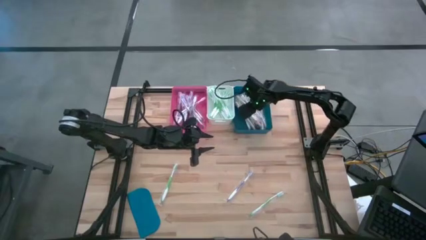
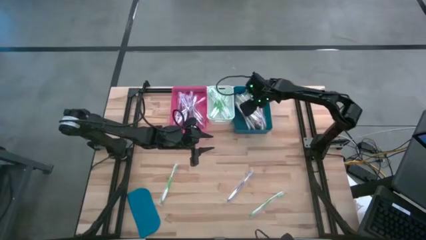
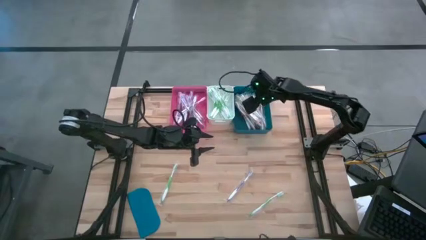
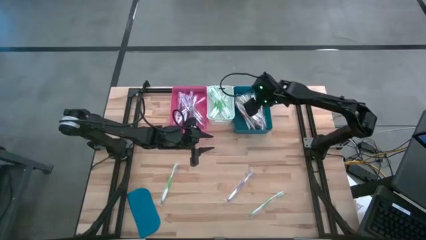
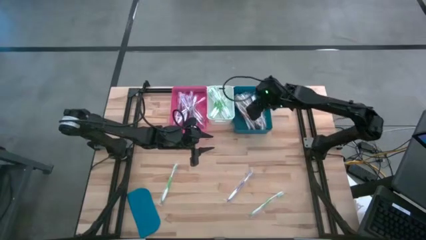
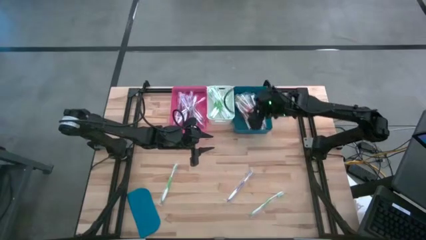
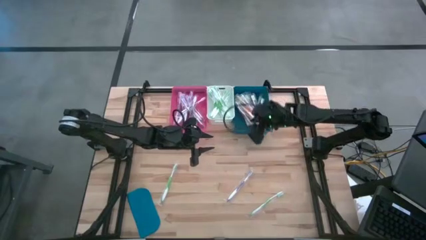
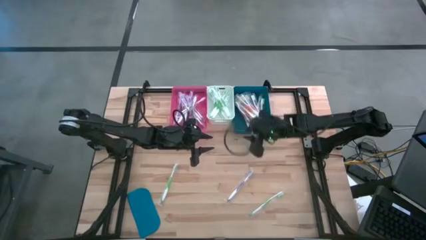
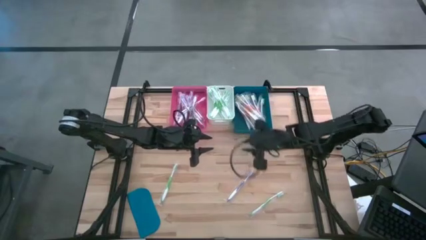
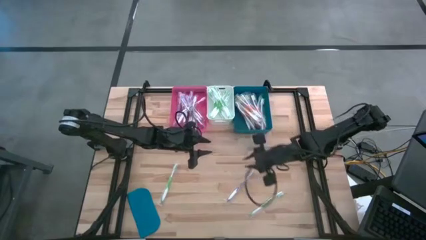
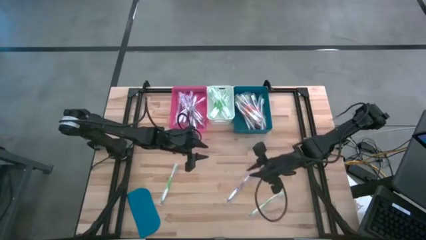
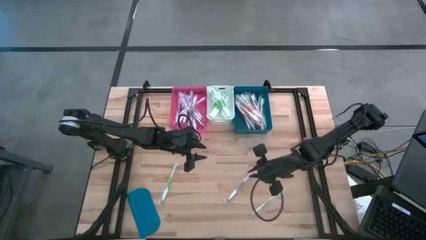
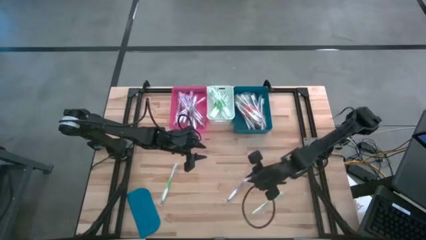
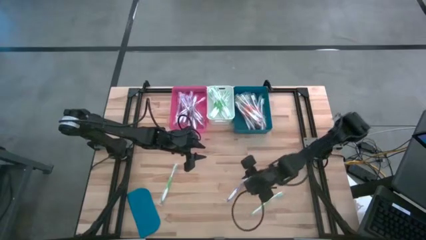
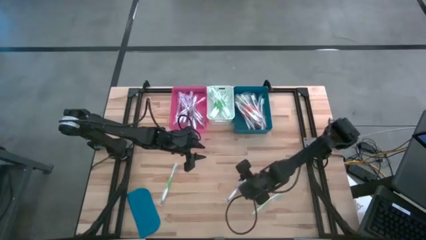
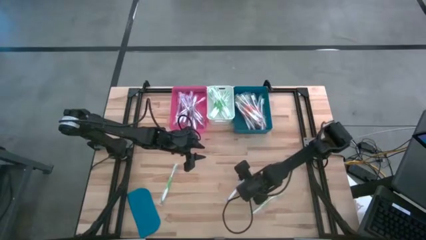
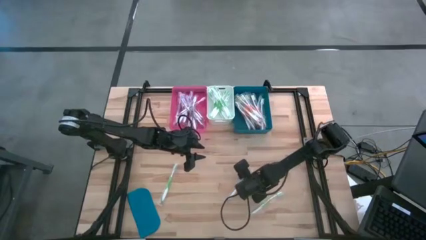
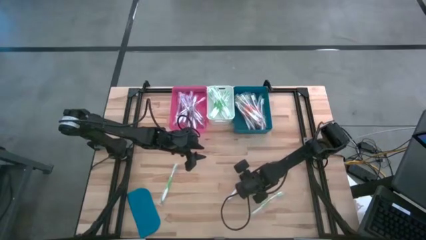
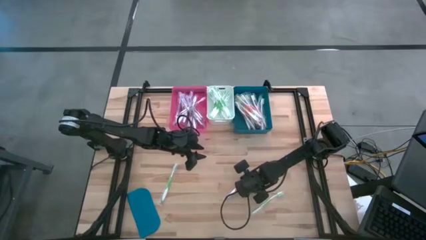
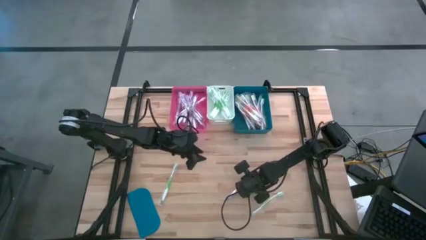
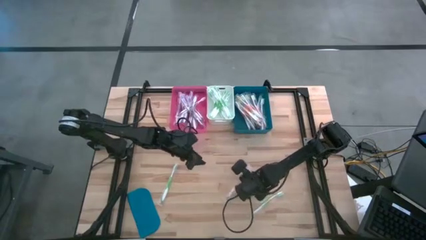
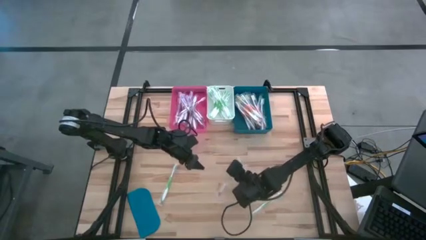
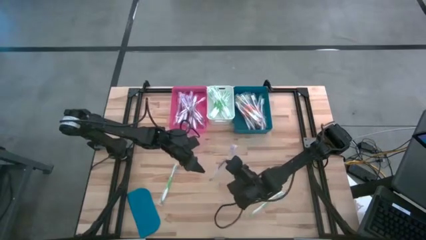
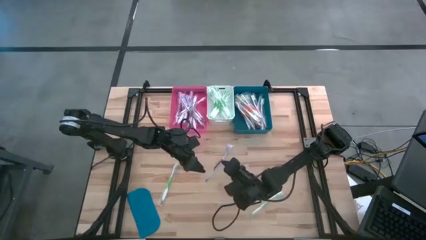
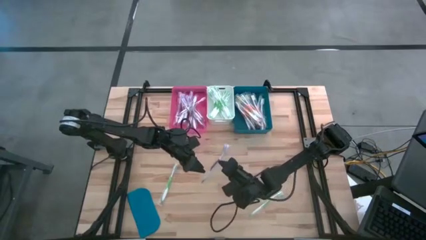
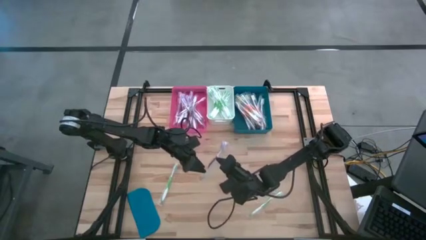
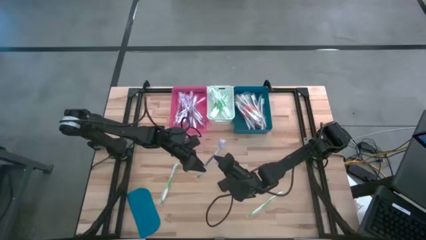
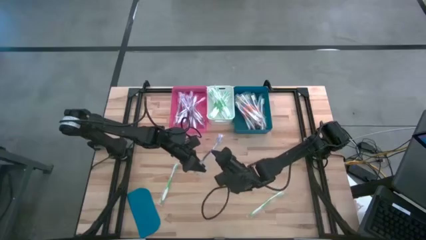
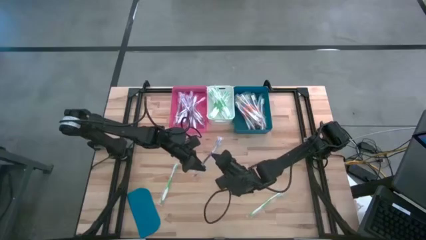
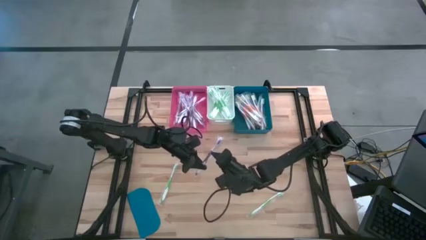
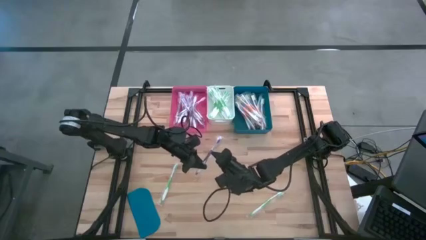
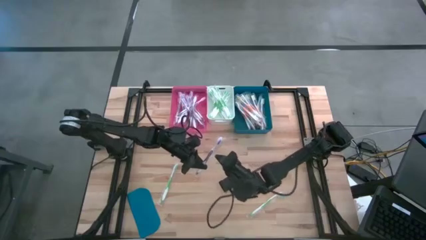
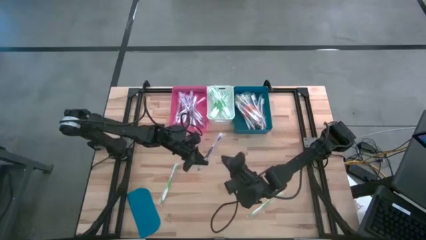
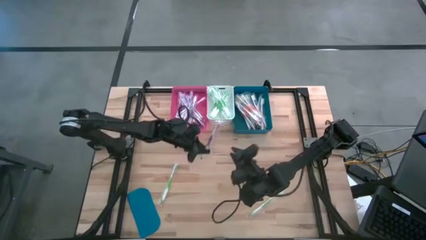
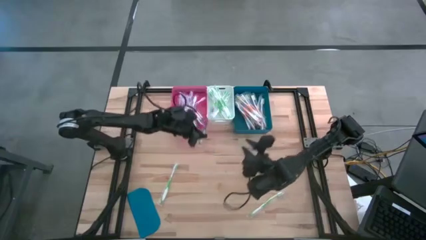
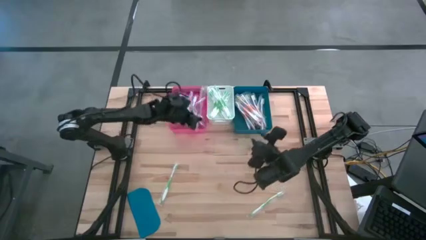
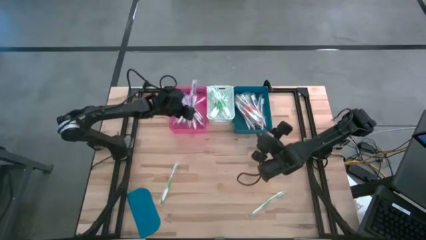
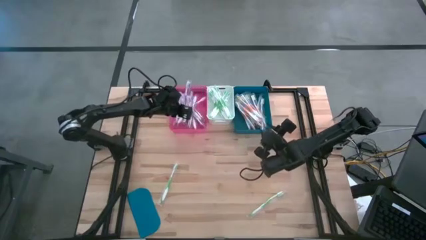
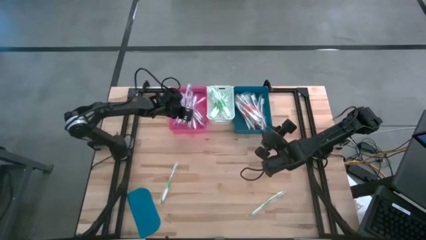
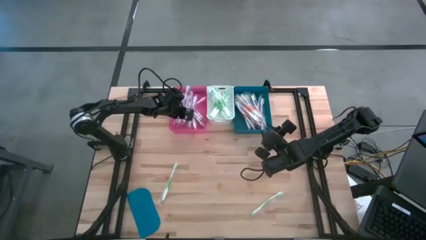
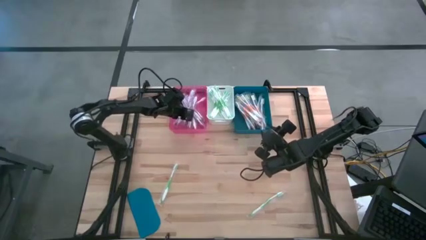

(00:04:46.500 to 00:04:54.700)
Task: Pick & Place Toothbrushes
Put the violet toothbrush into the pink bin

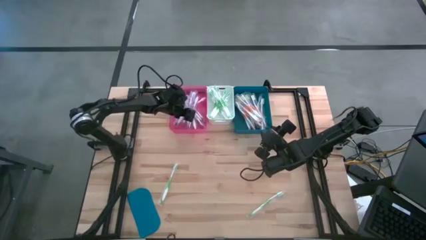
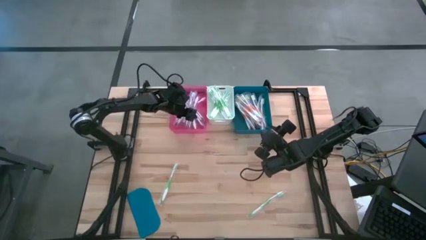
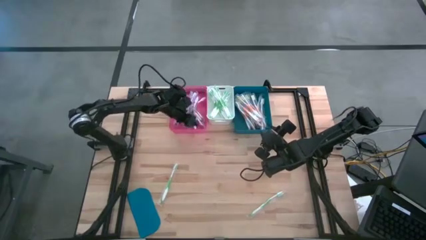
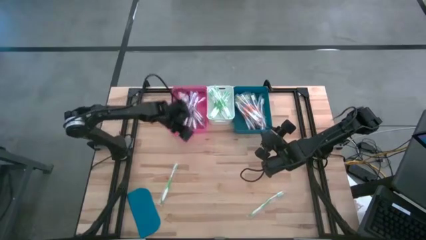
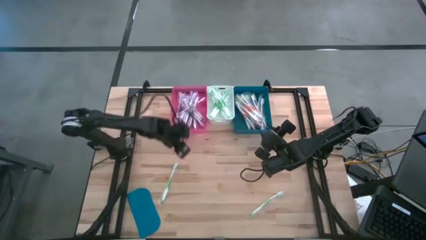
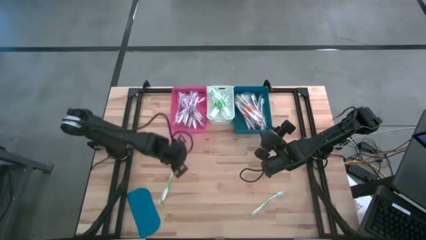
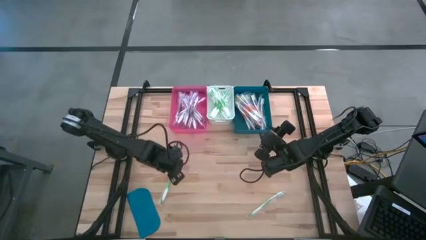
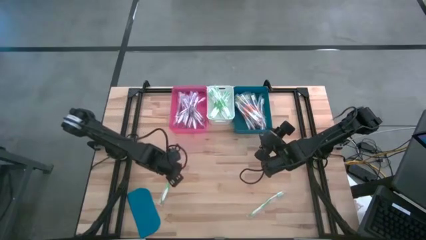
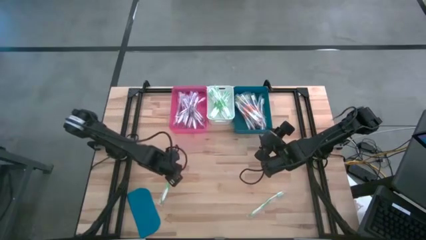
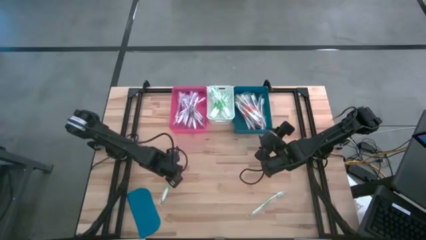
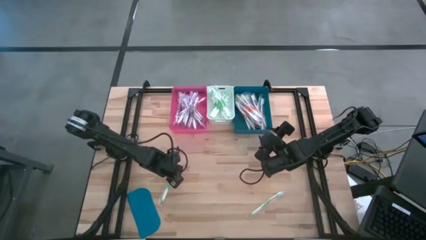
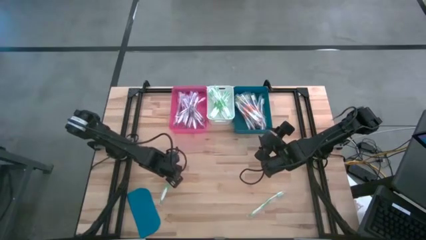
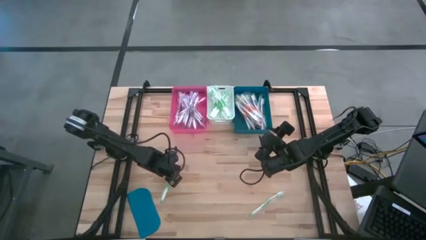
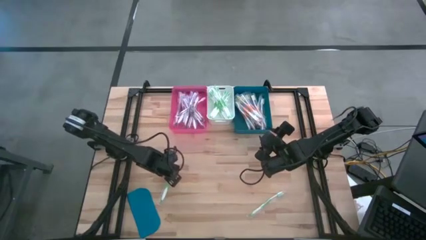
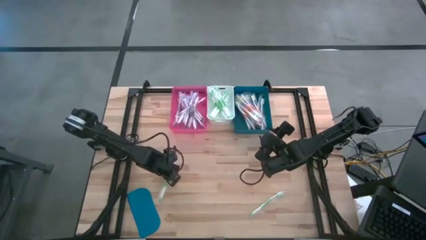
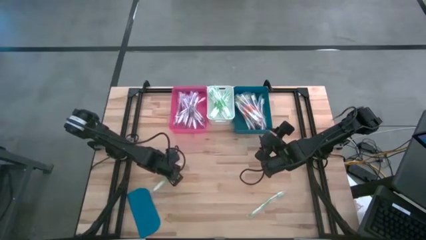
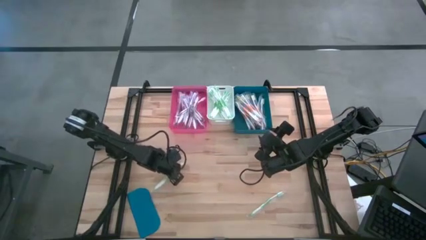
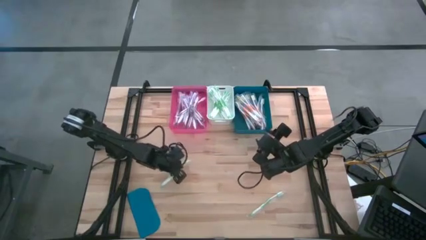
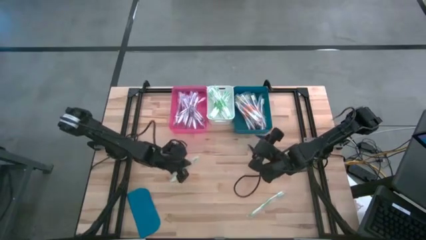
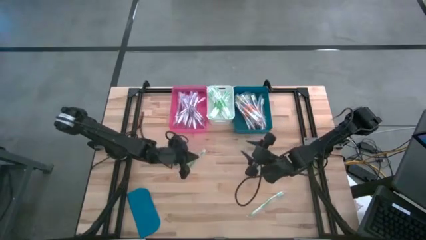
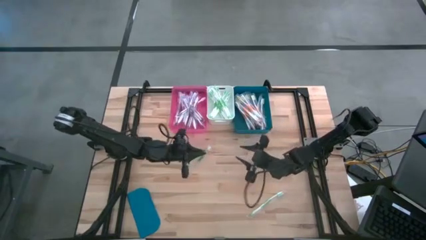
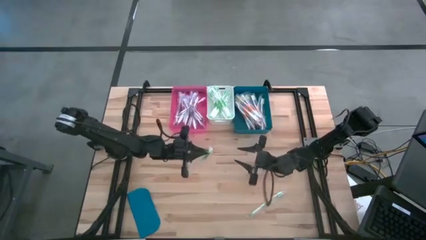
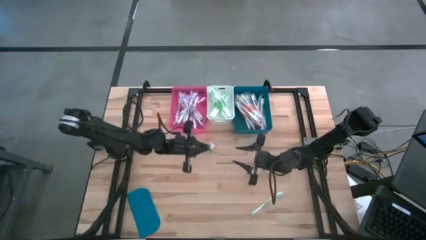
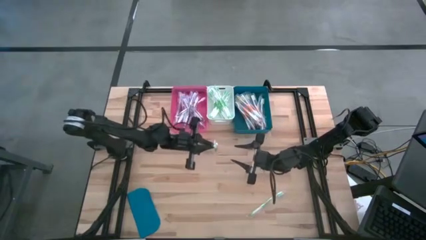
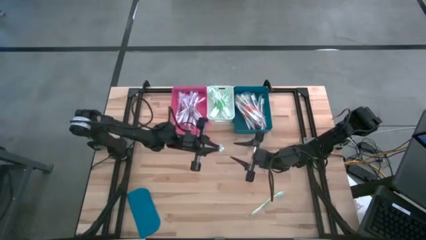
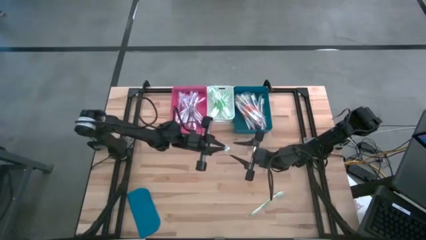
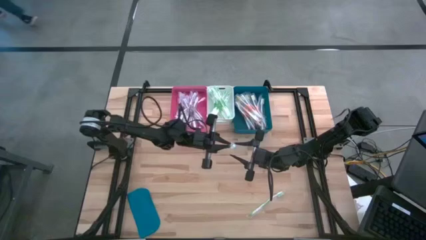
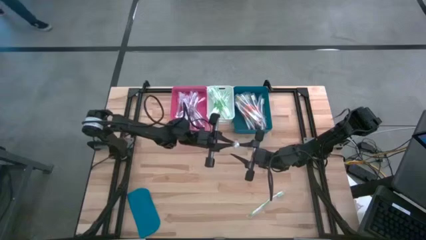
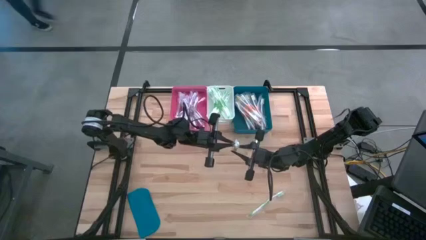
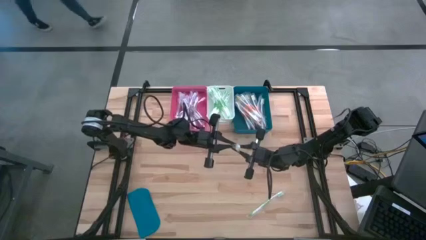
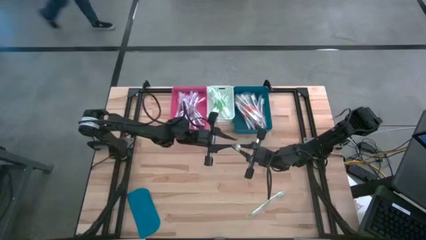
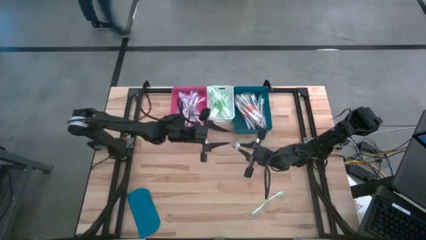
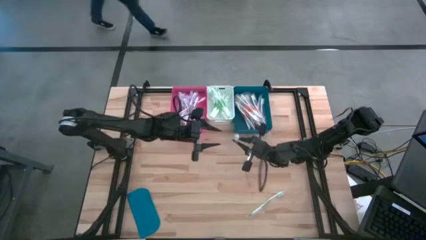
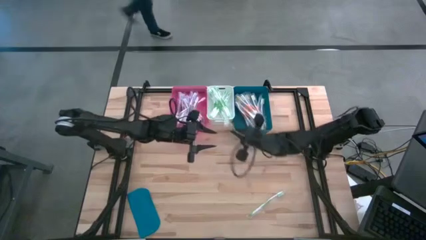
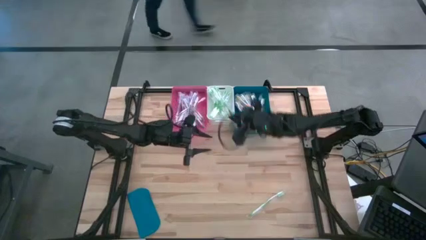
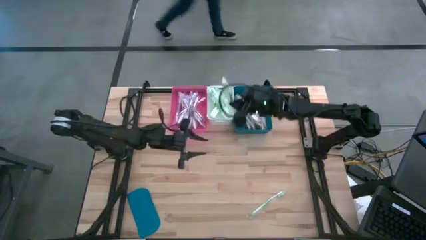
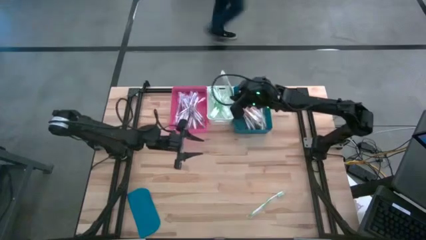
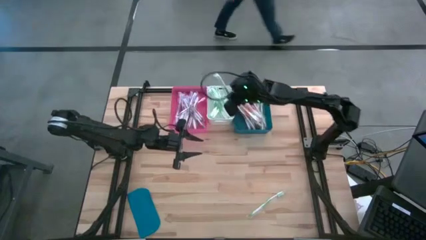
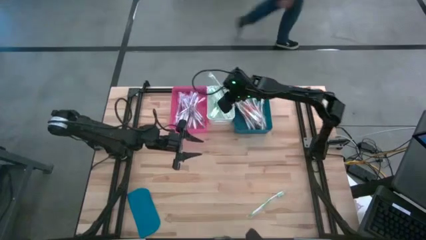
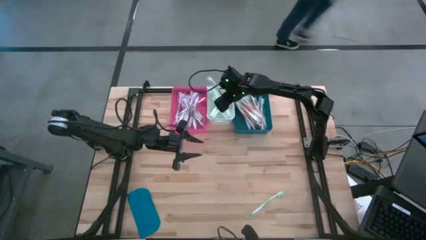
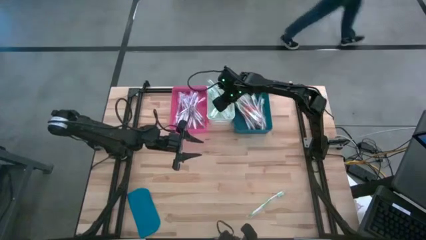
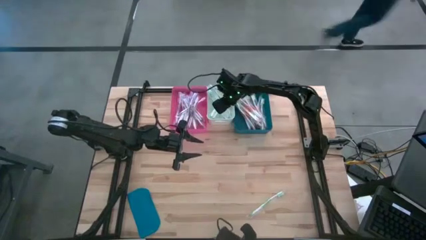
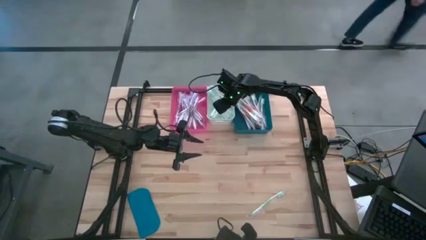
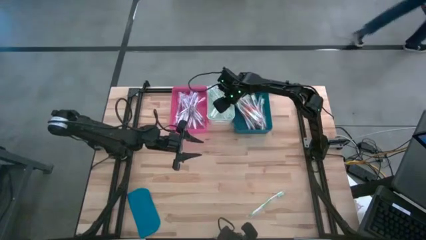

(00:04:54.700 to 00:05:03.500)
Put the green toothbrush into the white bin
